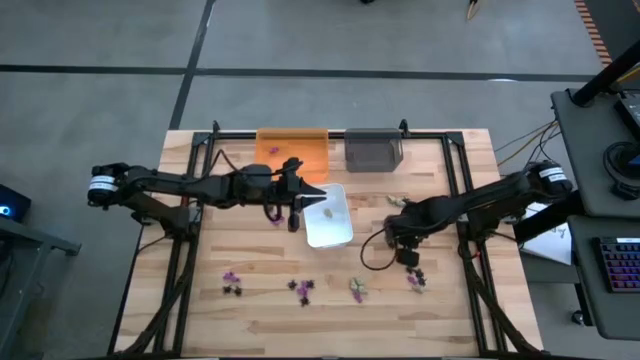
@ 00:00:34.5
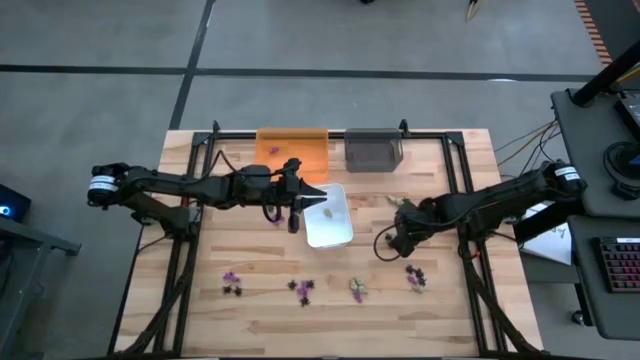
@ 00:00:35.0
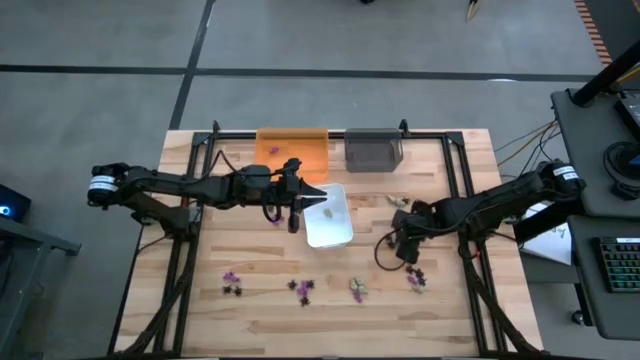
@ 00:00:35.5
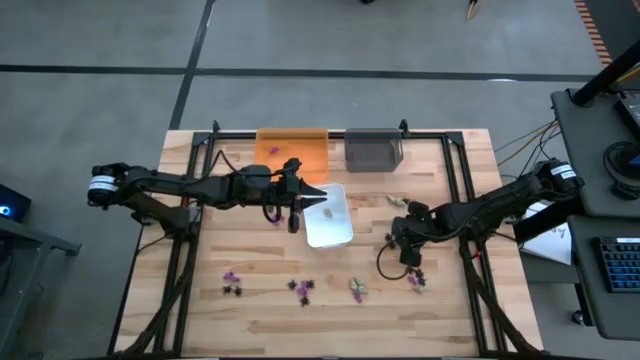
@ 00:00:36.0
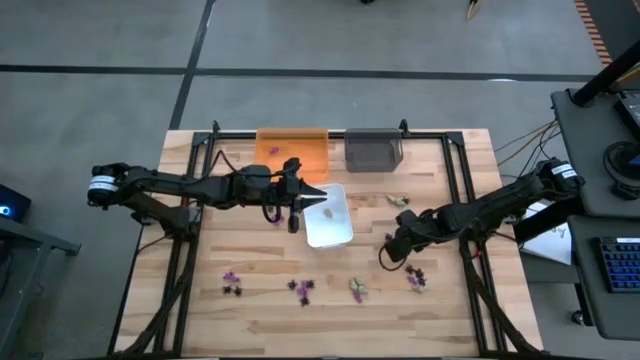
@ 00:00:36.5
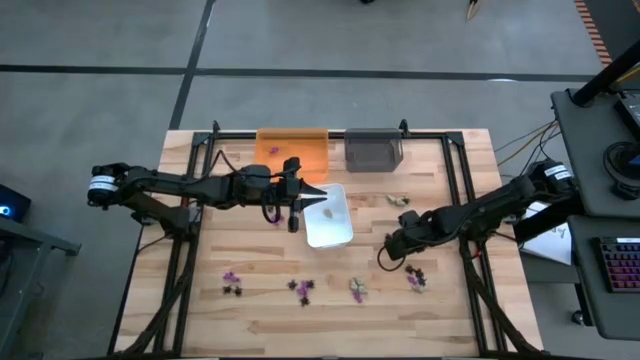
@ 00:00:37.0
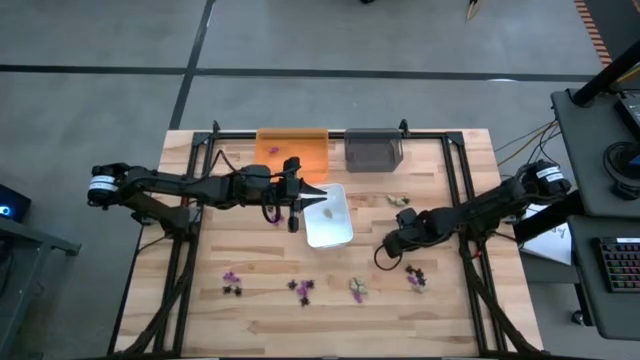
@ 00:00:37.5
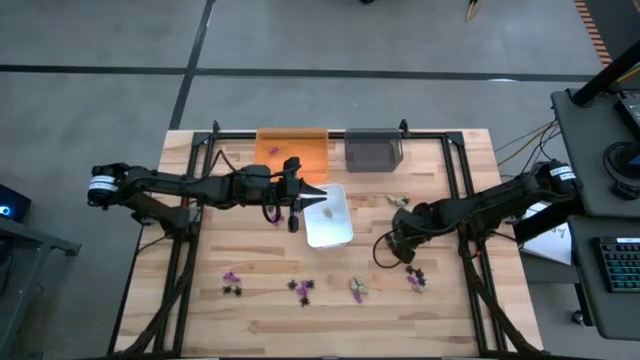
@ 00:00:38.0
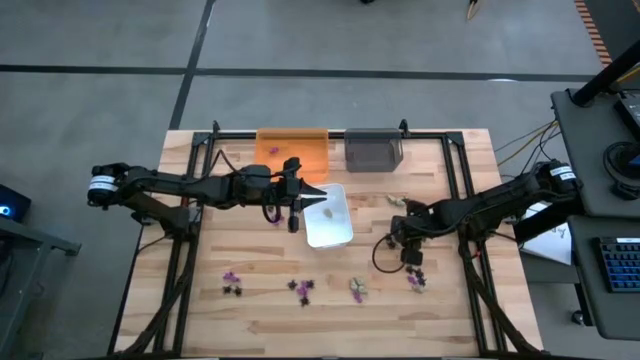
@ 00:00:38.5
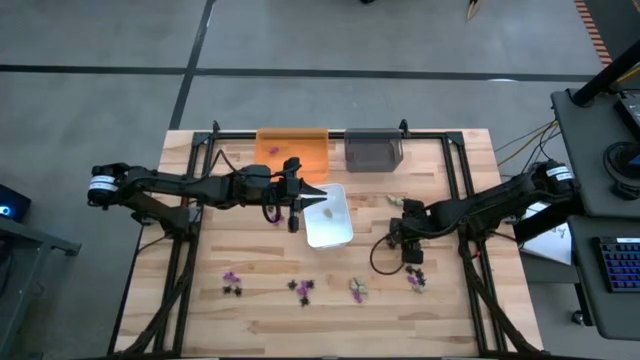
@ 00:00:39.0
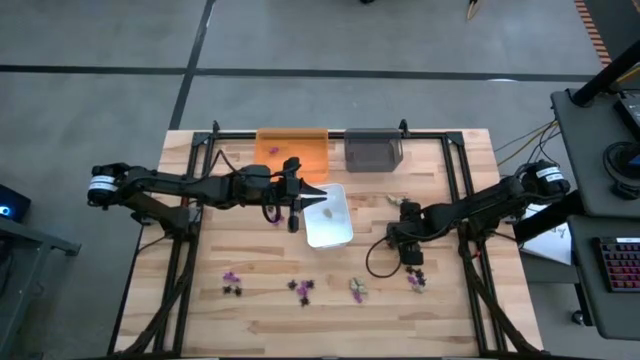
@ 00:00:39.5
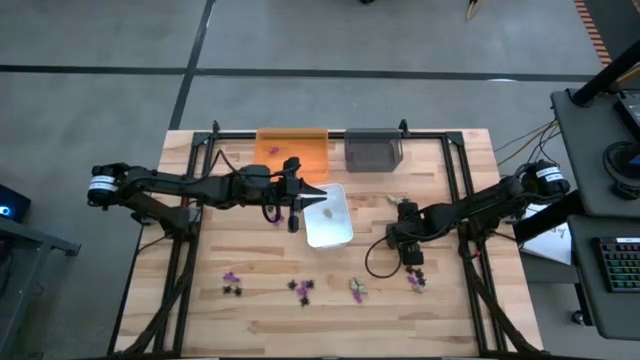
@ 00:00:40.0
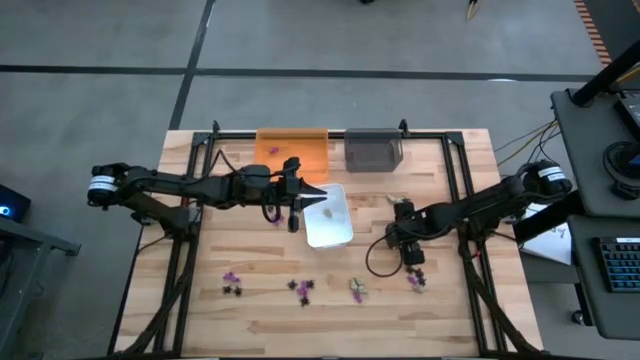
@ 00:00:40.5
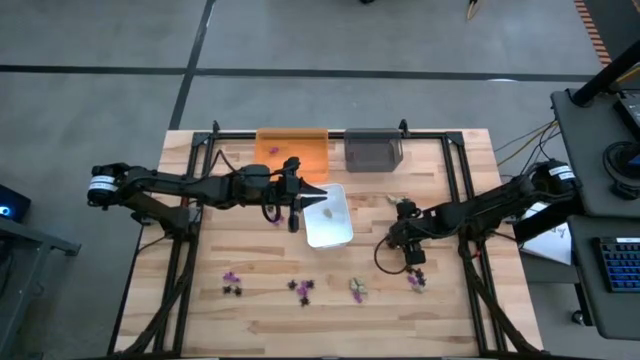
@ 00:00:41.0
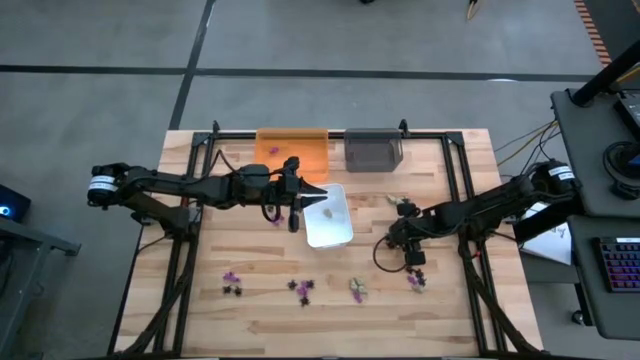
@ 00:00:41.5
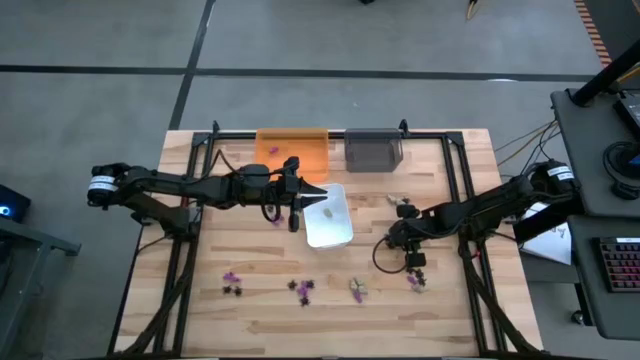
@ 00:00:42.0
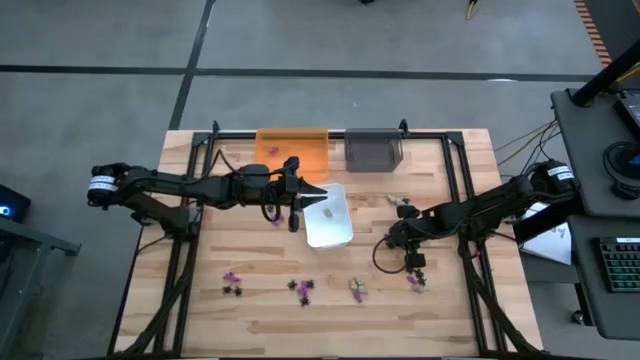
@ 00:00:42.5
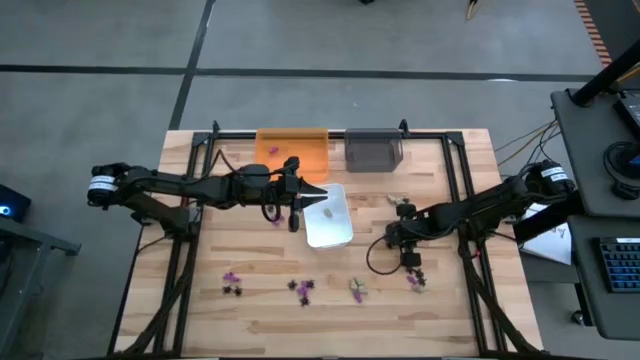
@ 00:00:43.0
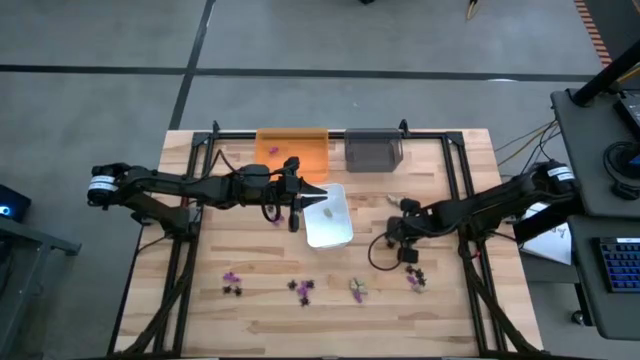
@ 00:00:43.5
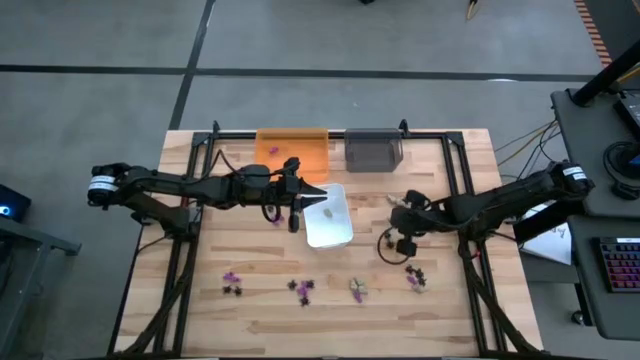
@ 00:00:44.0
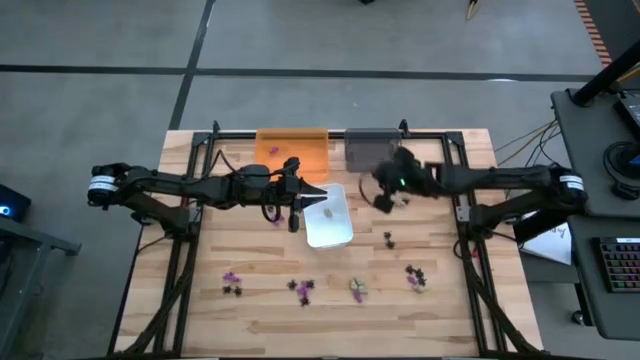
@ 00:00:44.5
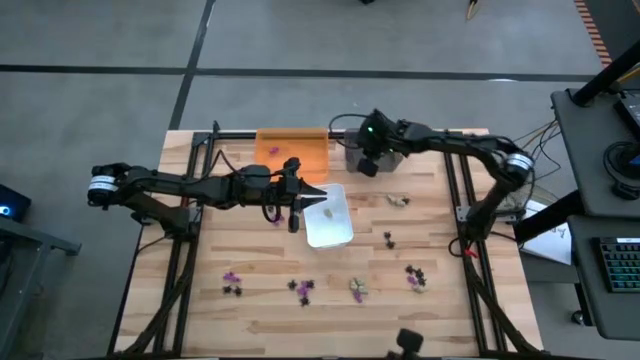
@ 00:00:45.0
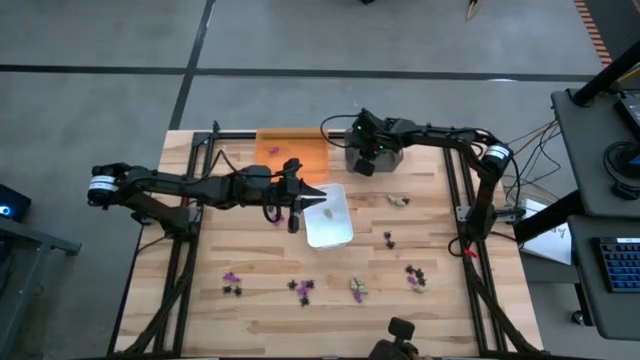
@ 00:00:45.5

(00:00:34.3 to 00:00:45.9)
Task: Sort Halloween decoration
Put the black spider toy into the black bin

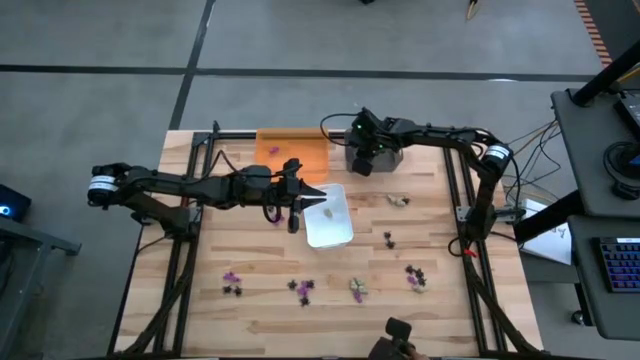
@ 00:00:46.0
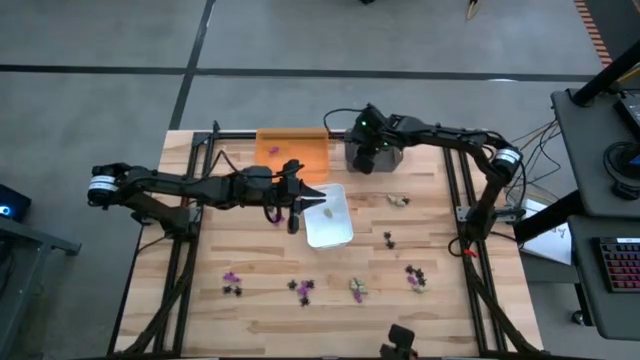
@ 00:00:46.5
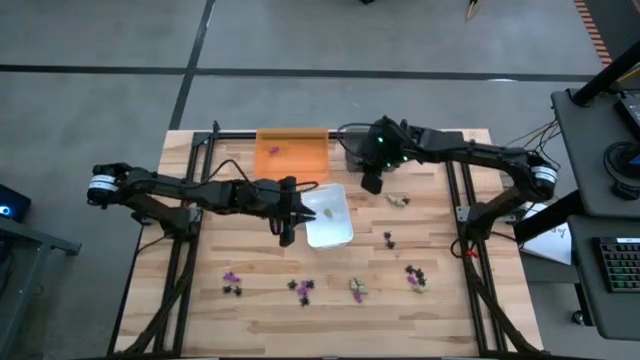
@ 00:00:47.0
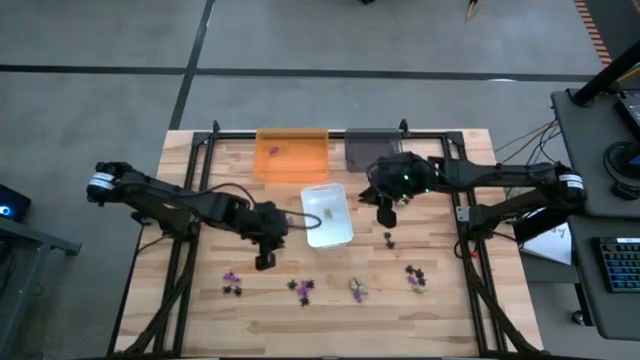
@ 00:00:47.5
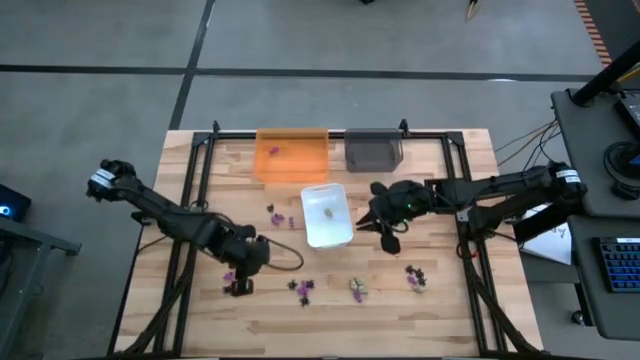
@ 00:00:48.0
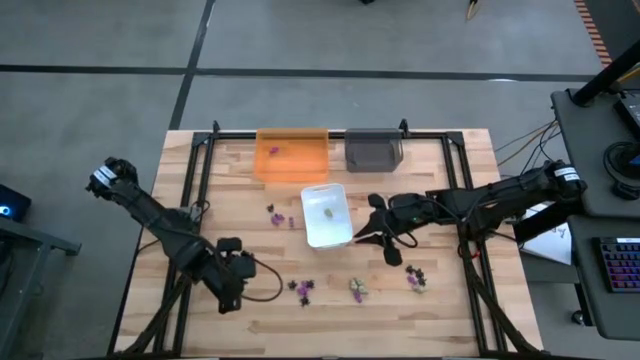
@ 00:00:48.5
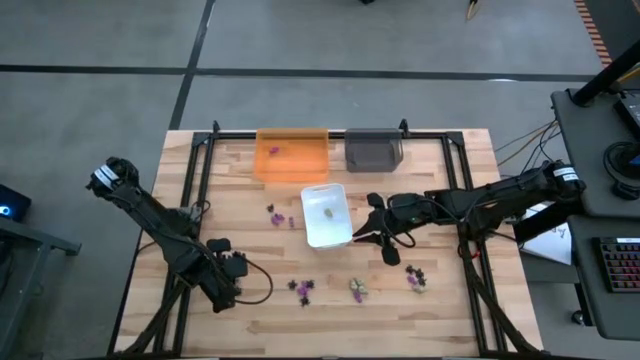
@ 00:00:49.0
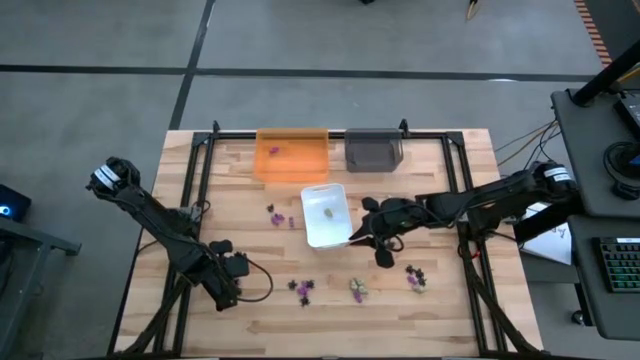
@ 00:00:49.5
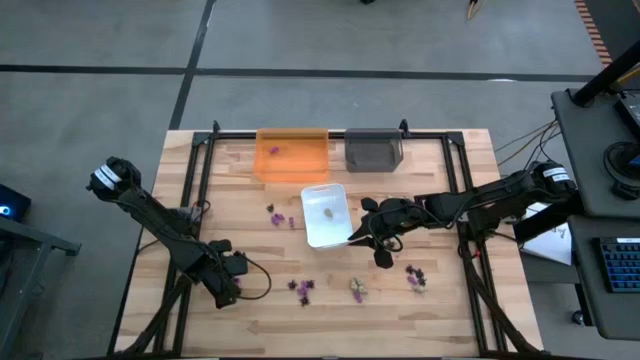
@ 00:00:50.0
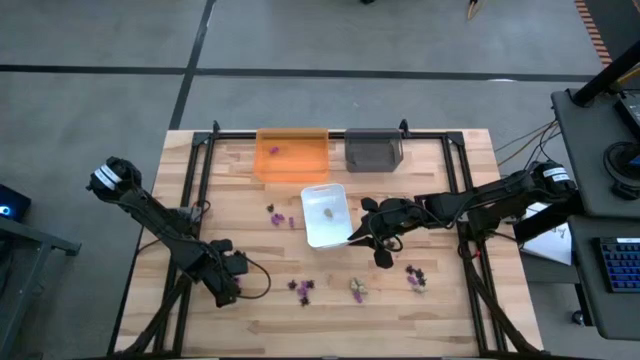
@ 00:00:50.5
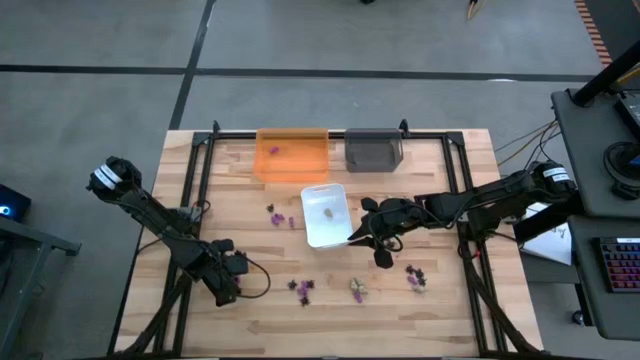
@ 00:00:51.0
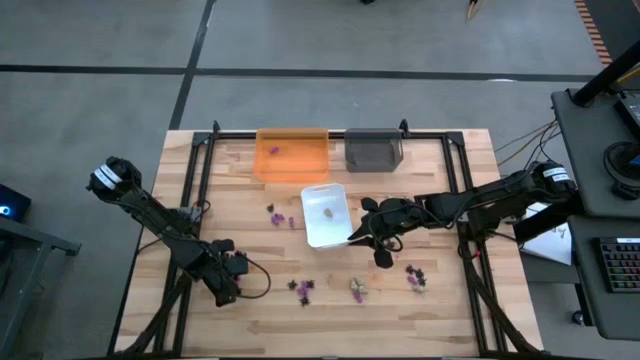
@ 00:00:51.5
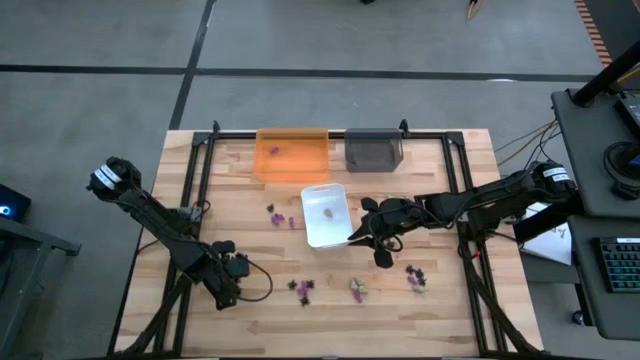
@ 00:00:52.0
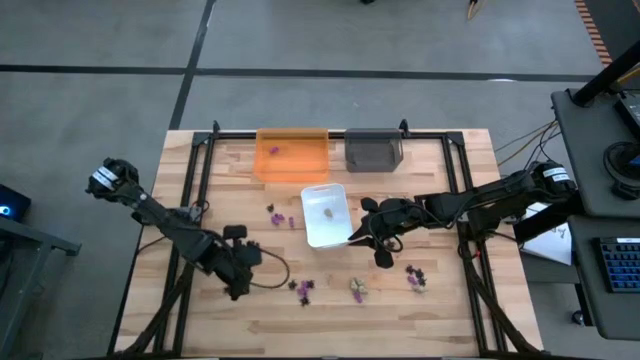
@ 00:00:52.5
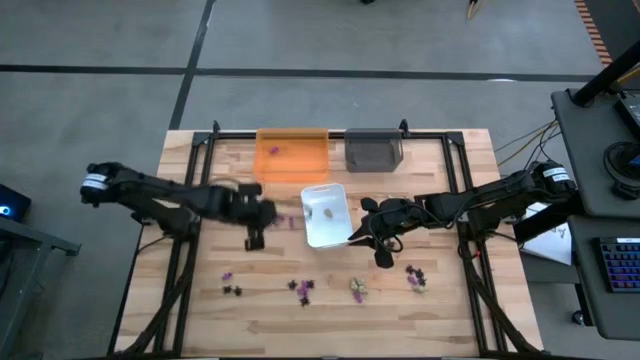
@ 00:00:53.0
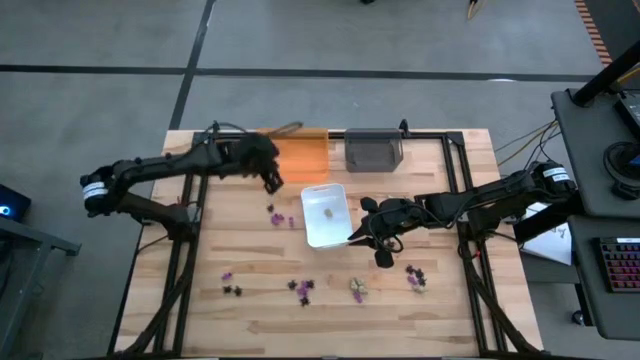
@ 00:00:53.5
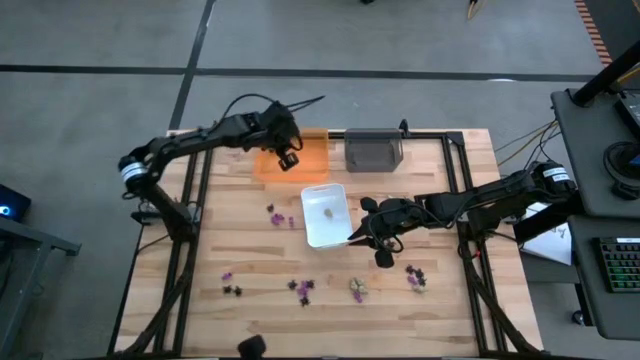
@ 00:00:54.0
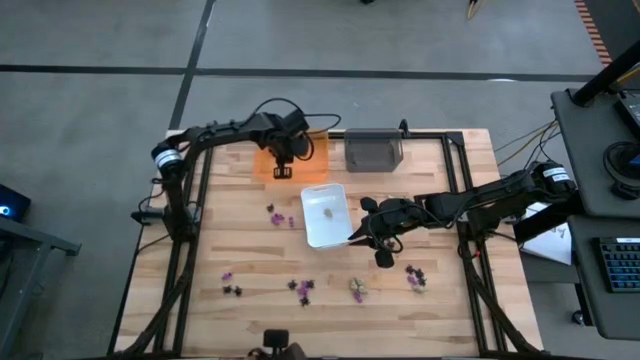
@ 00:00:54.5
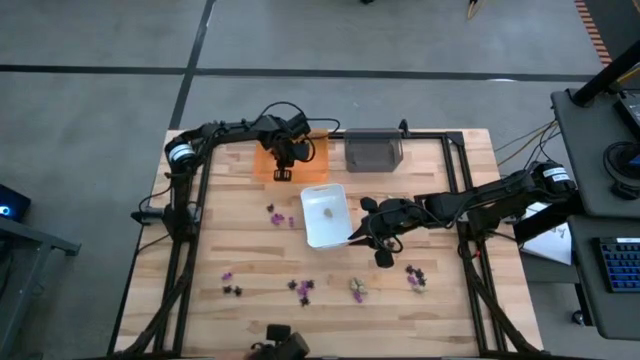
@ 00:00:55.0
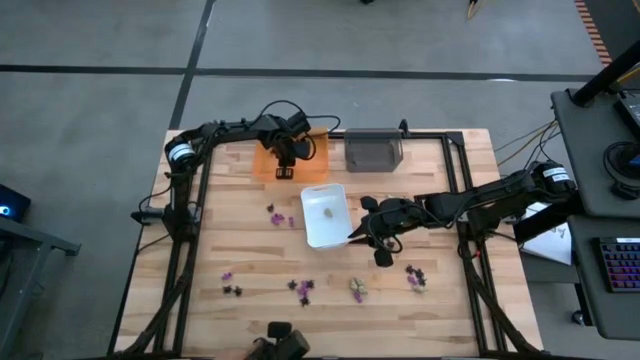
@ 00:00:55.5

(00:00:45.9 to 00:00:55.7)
Put the purple skeleton toy into the orange bin
